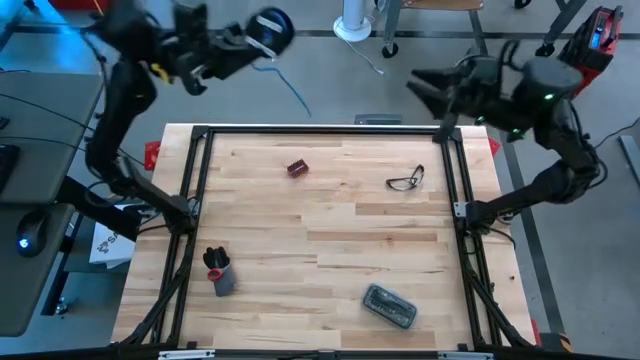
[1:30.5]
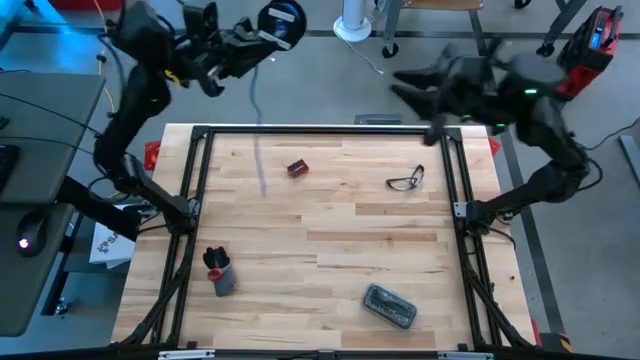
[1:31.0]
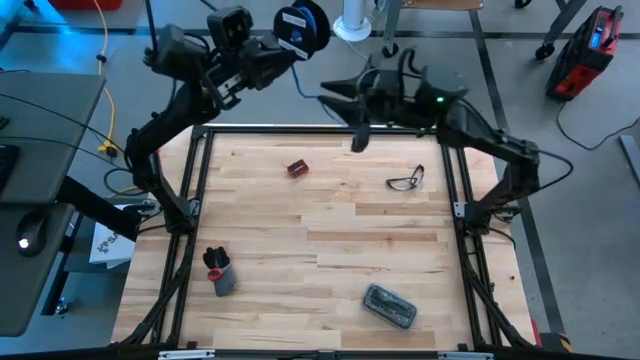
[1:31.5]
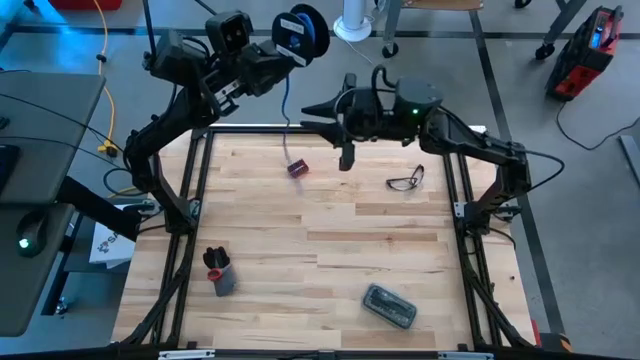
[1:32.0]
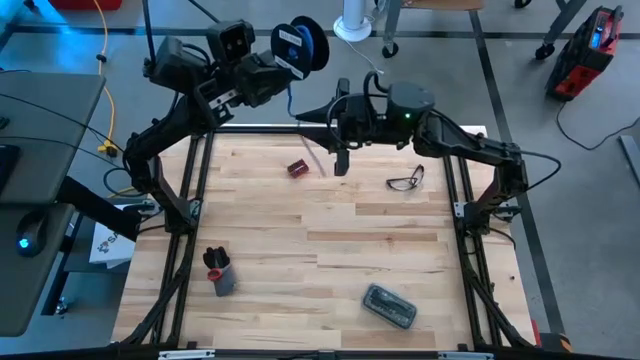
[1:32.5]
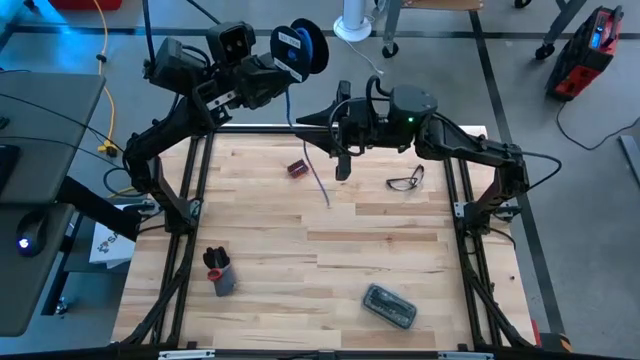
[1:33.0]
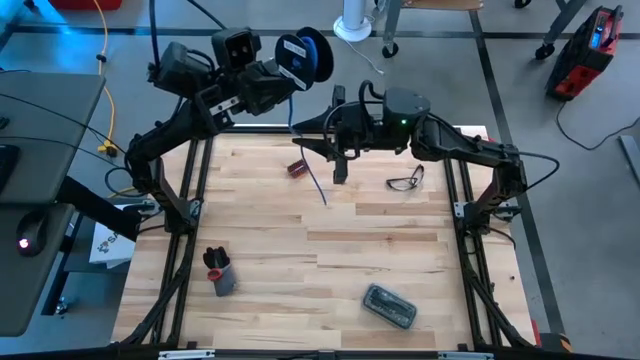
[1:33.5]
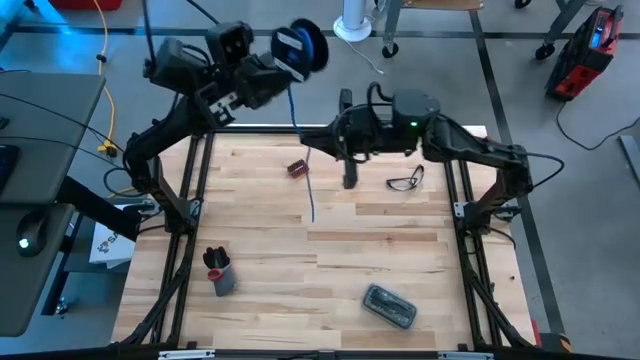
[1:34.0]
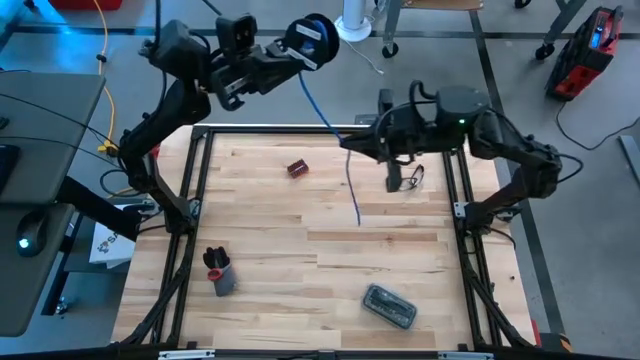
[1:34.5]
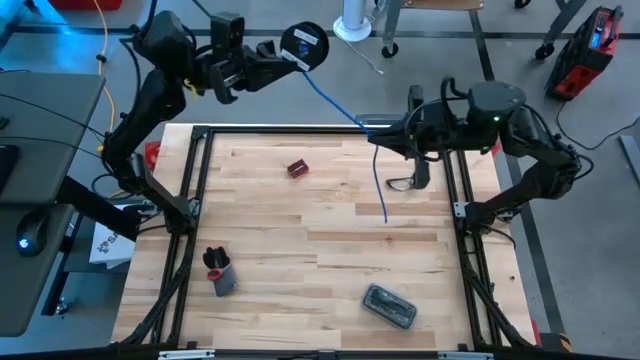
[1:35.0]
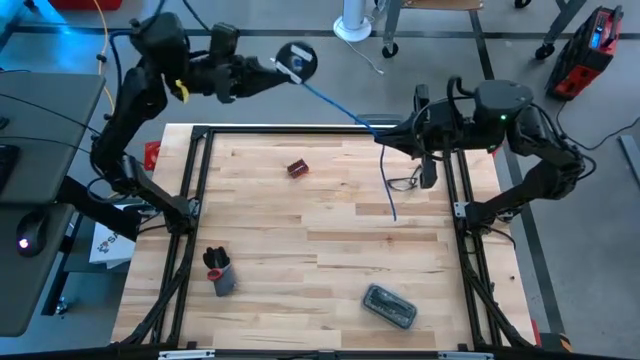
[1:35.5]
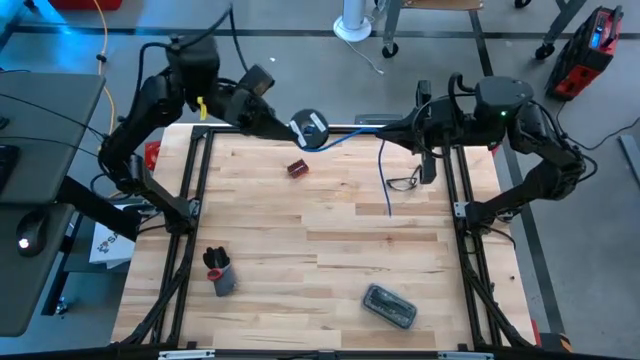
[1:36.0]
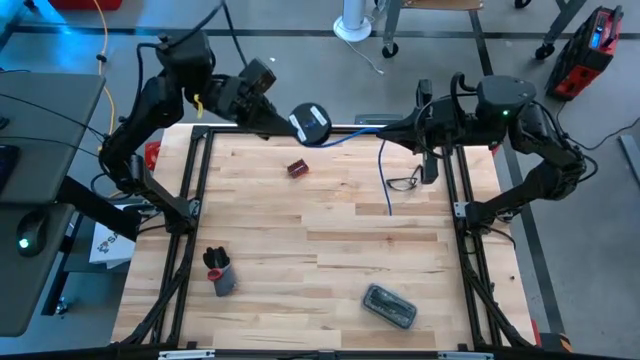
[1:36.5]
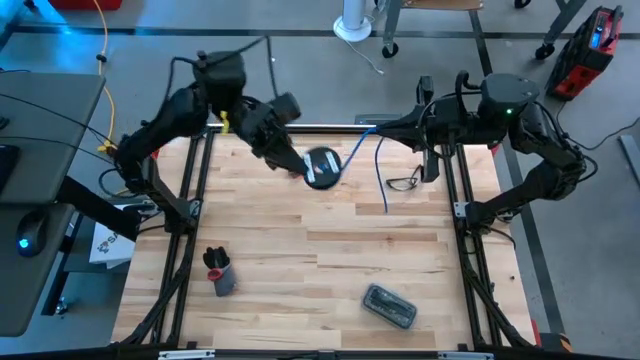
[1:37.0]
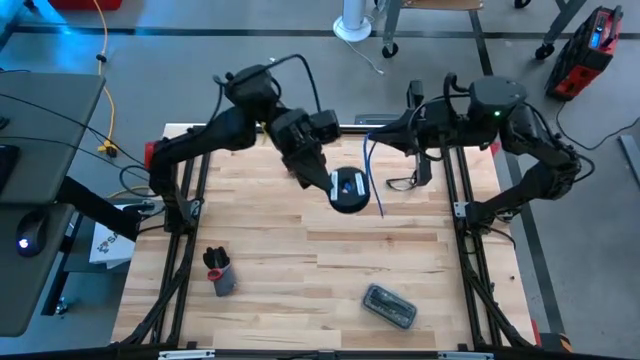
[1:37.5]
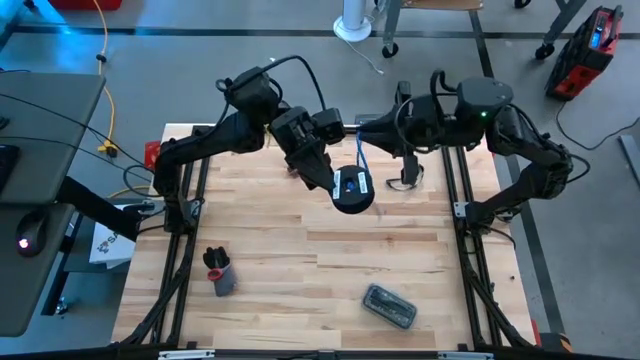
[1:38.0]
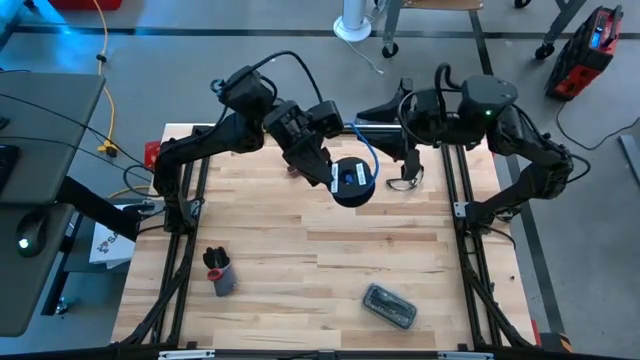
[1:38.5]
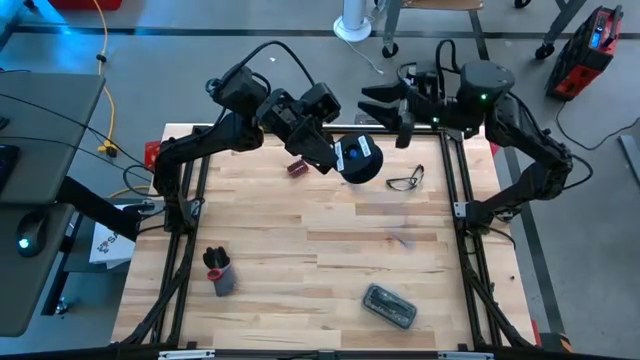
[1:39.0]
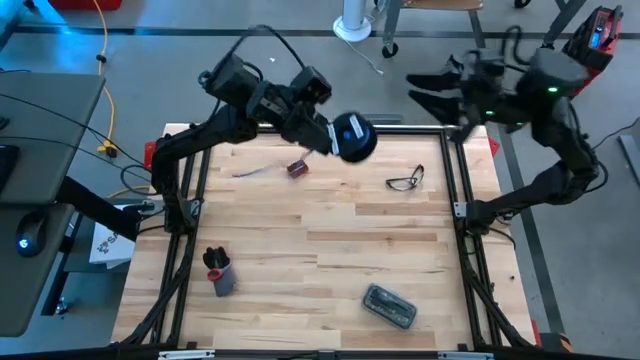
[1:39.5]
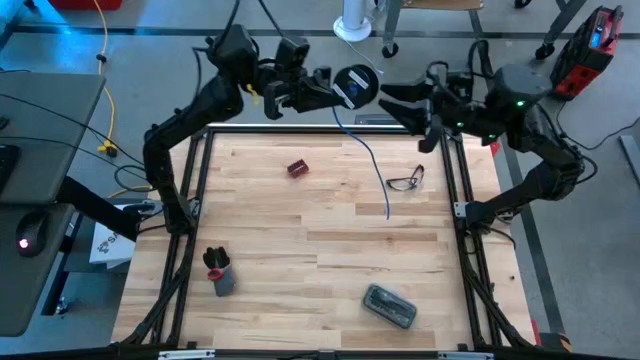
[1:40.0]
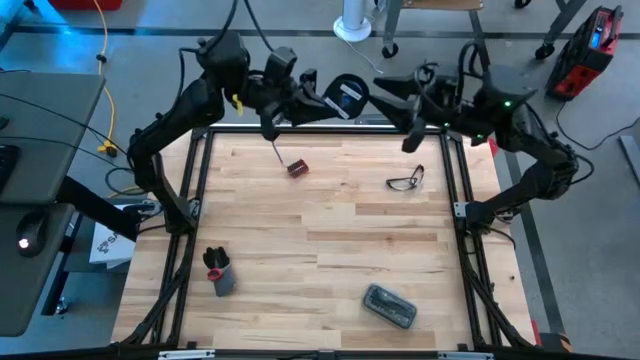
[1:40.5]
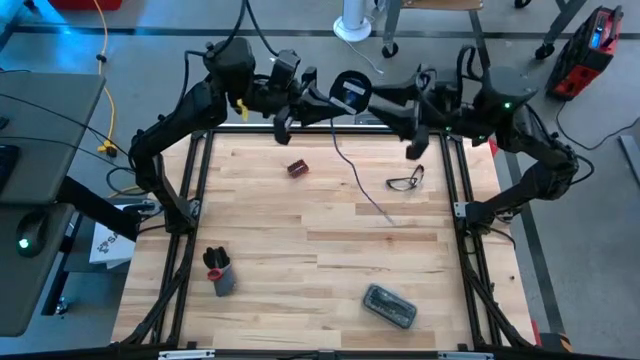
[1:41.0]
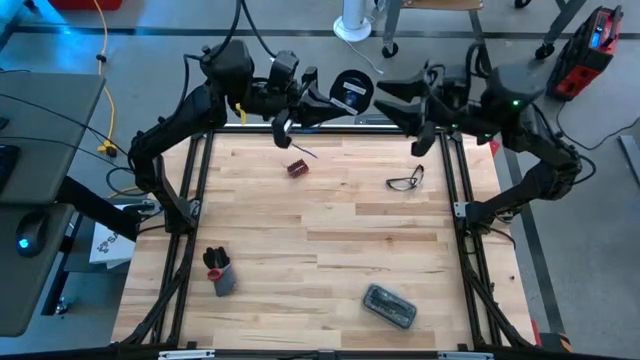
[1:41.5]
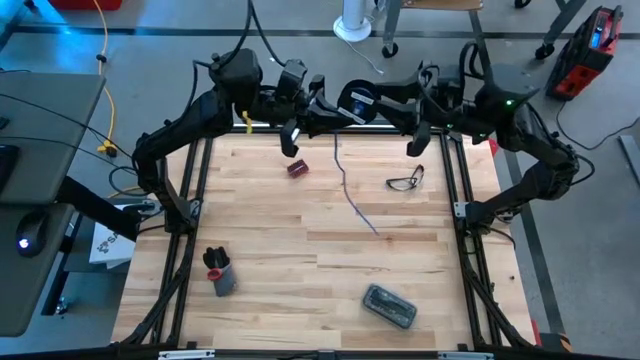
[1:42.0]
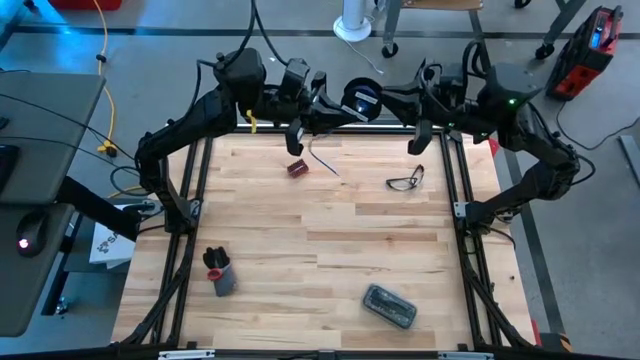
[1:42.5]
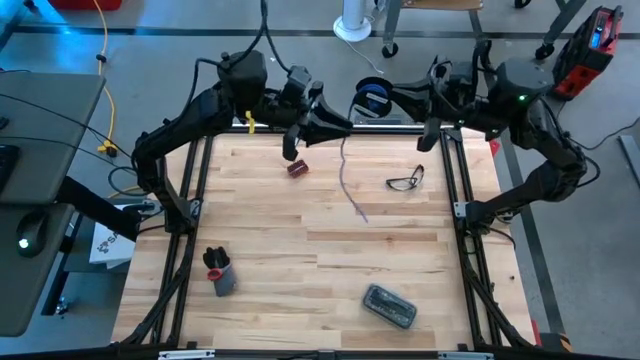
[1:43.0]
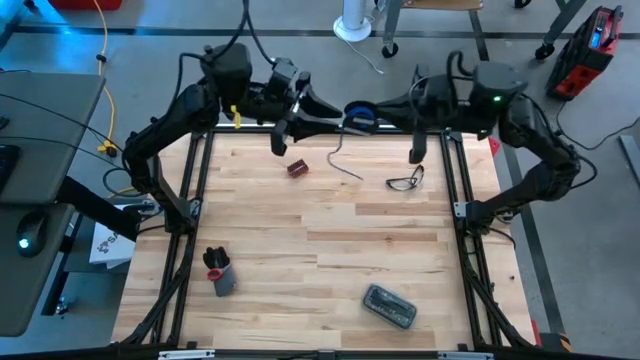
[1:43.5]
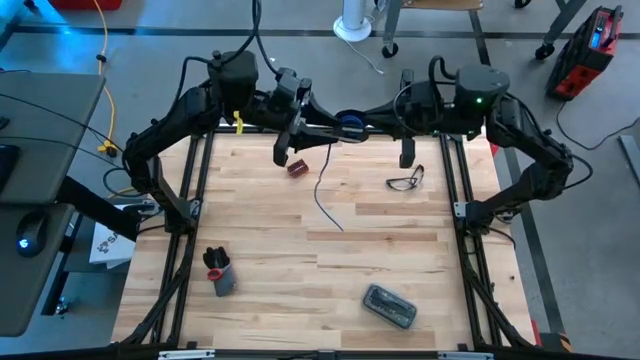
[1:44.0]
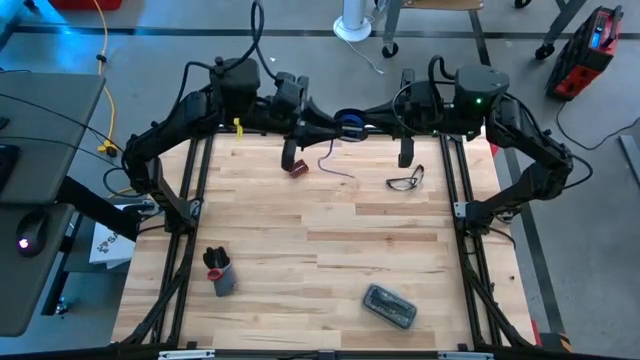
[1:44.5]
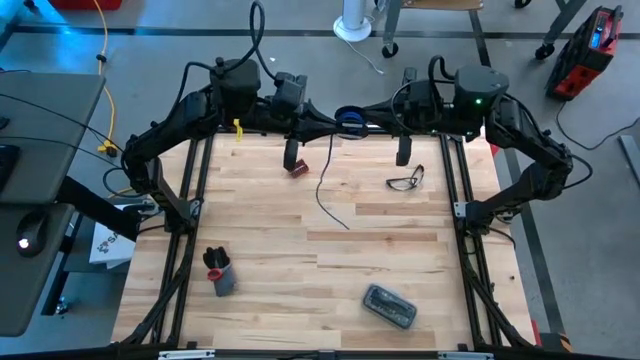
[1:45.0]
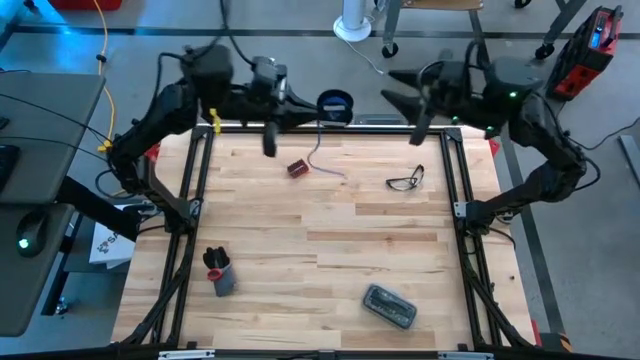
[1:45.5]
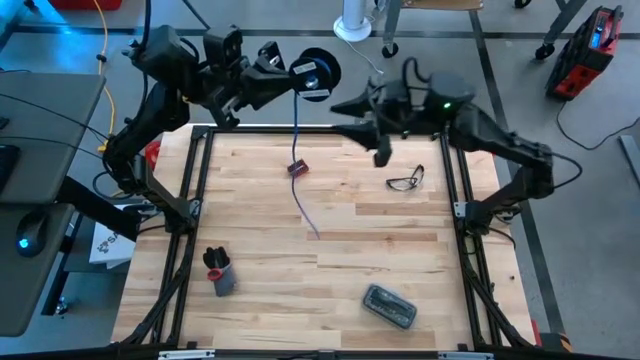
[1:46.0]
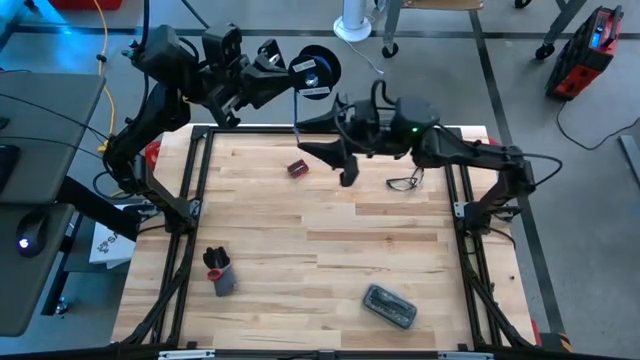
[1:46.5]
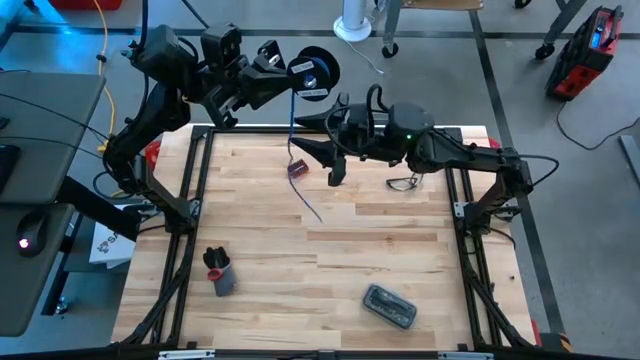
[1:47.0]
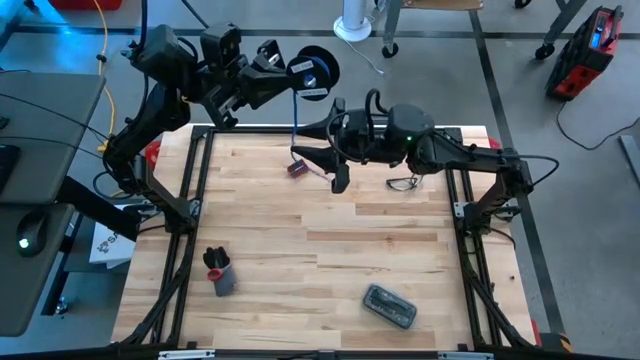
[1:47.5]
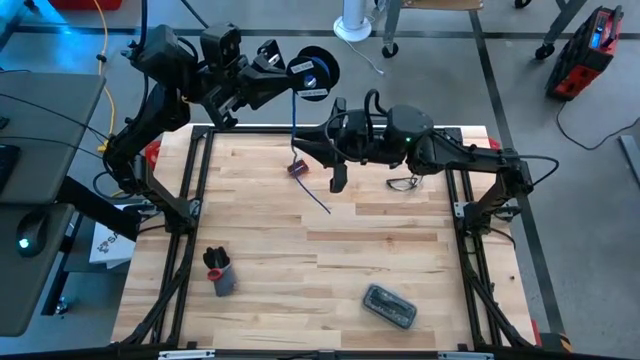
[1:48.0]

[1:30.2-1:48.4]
Task: Coil cords
Coil the blue wire onto the spool
